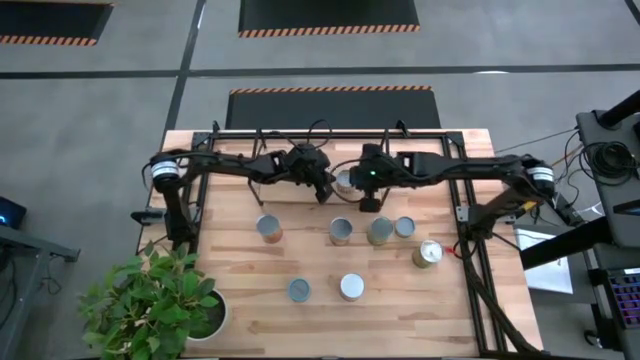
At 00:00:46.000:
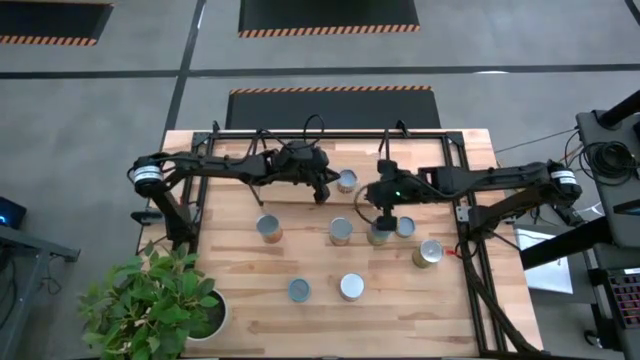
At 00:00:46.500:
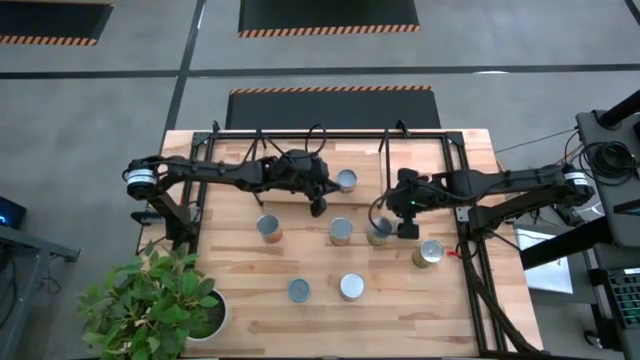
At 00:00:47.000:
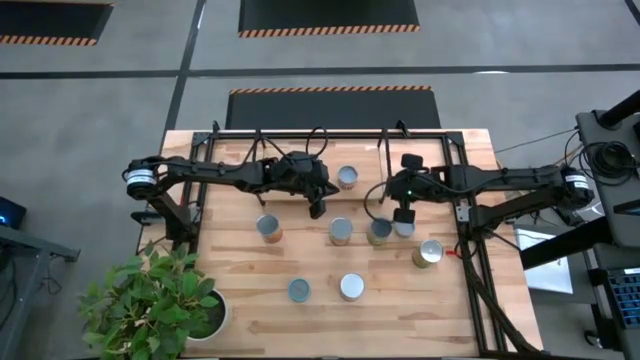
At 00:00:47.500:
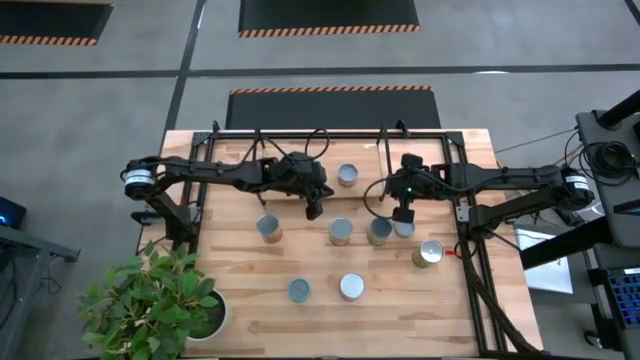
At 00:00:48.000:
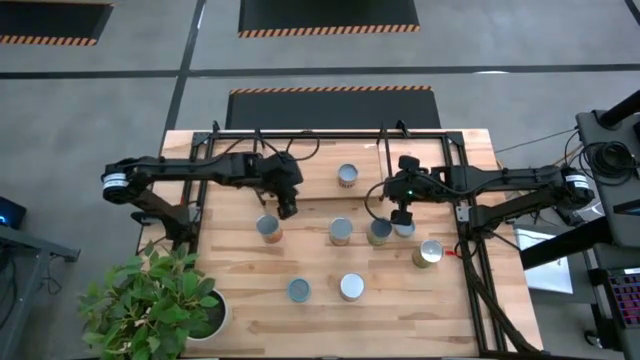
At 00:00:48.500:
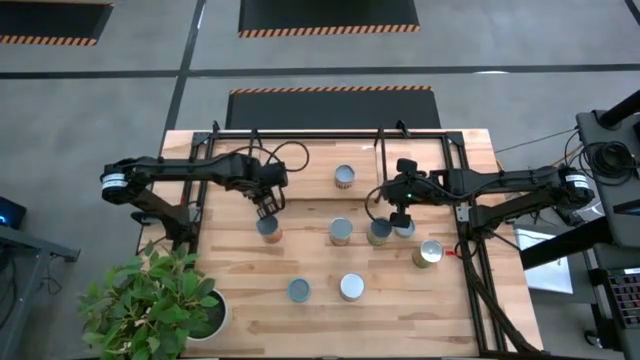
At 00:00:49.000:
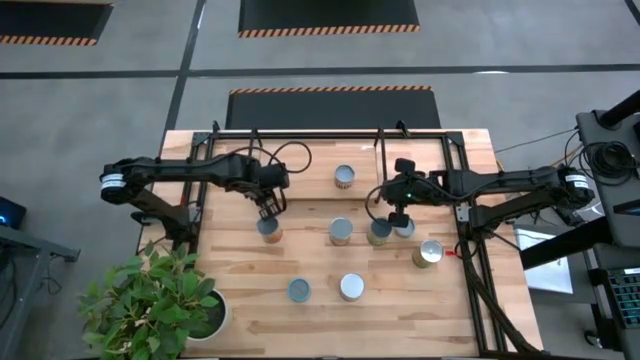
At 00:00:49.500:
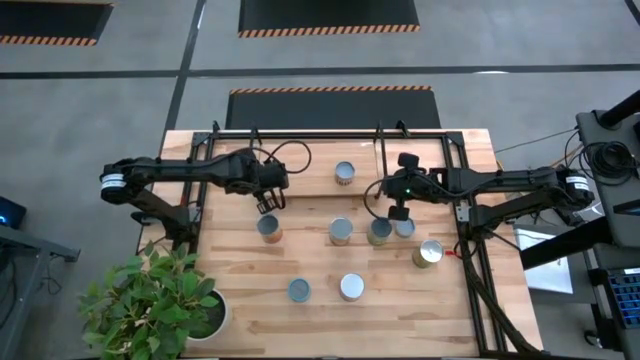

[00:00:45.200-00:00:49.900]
Task: Pick and place cans onto a shelf
Adjust the shelf

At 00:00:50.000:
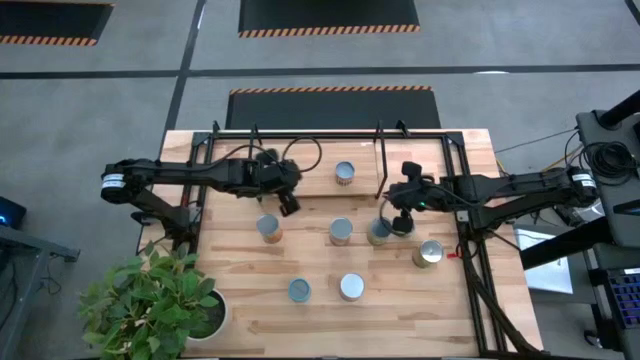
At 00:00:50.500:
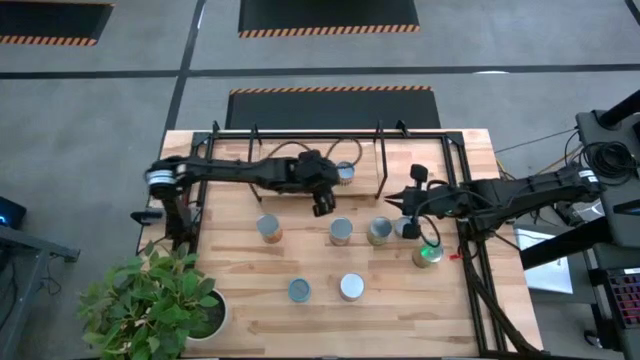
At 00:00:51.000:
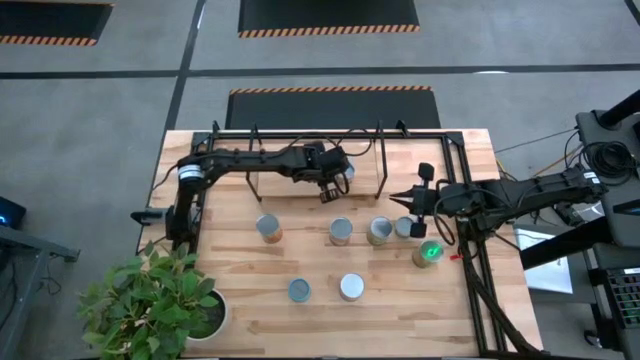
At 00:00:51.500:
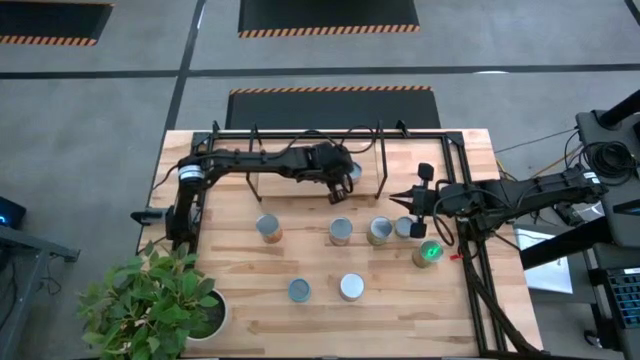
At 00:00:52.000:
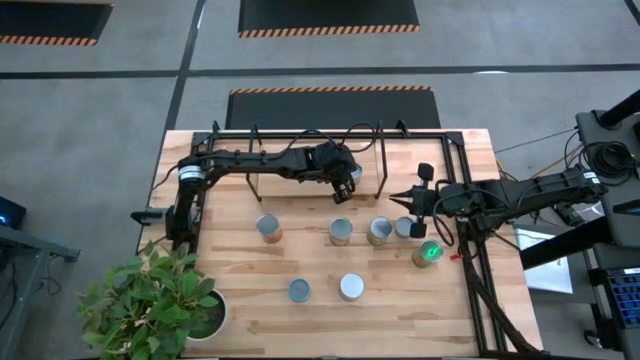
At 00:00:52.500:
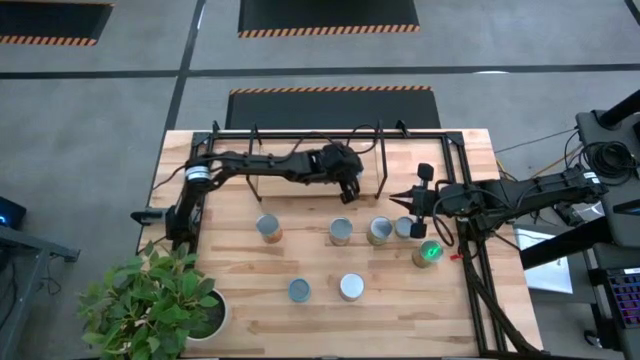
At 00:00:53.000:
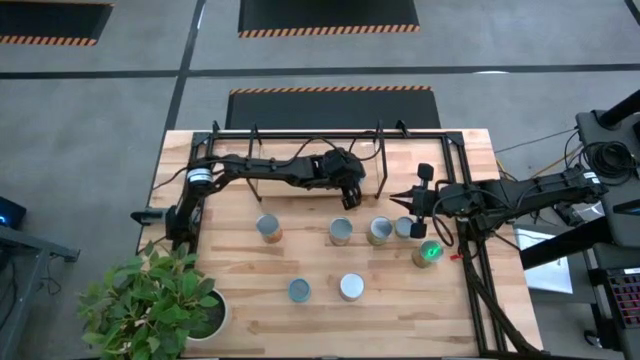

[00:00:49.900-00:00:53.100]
Adjust the small yellow canned bean on the shelf

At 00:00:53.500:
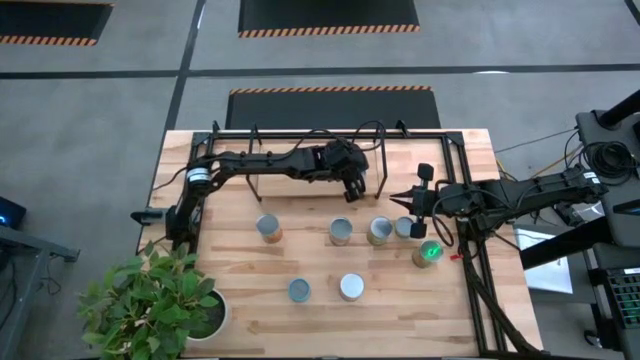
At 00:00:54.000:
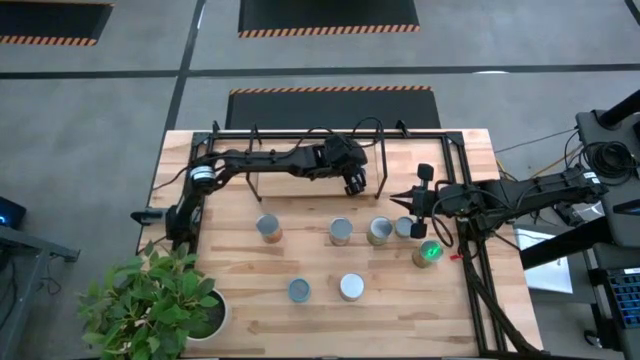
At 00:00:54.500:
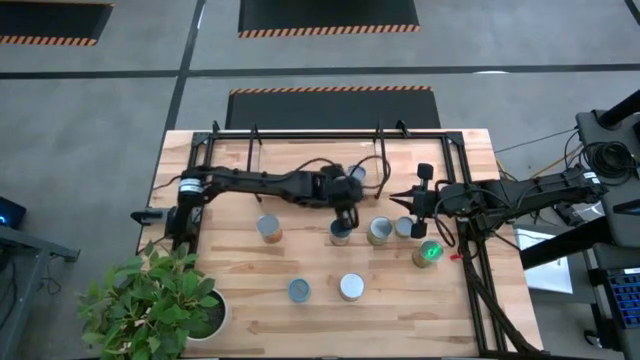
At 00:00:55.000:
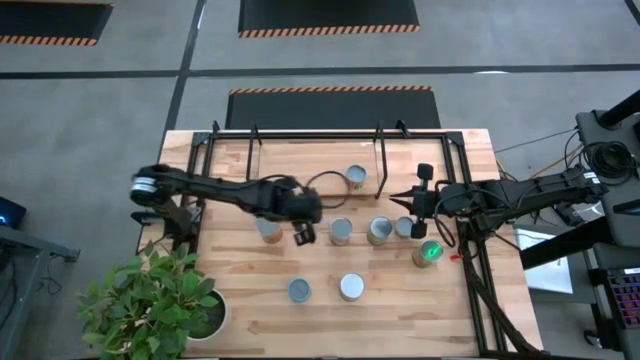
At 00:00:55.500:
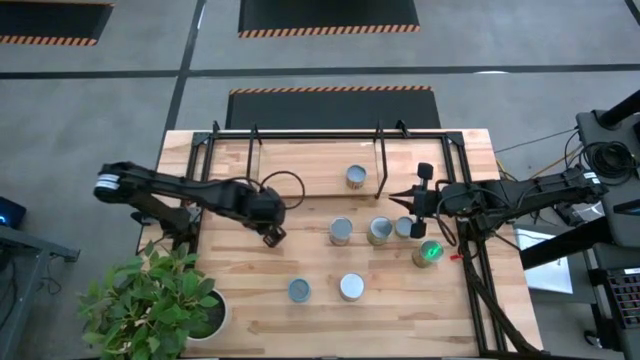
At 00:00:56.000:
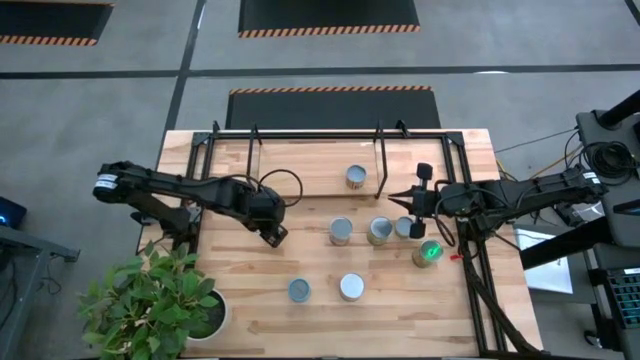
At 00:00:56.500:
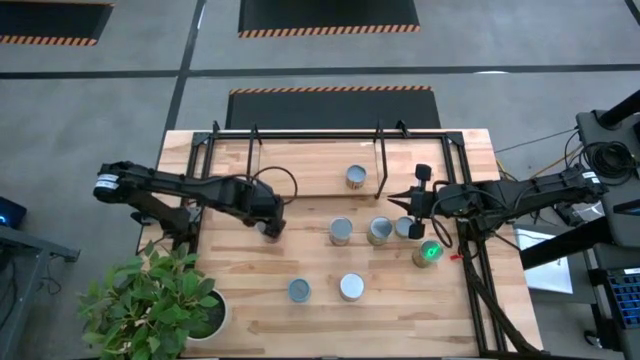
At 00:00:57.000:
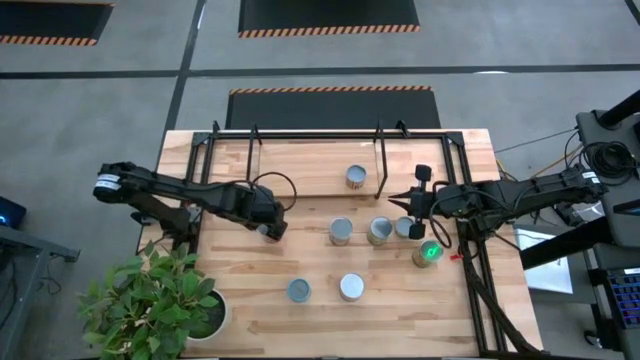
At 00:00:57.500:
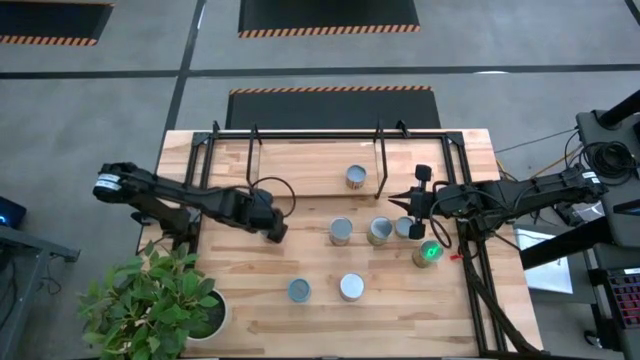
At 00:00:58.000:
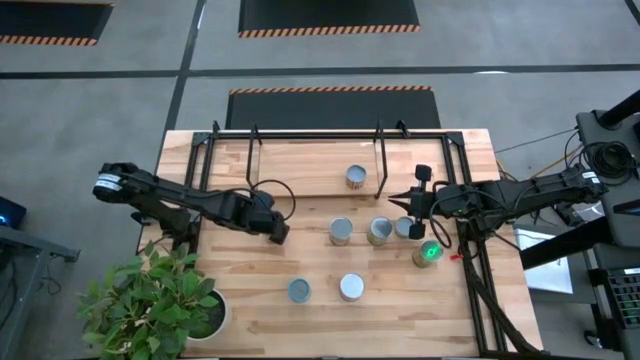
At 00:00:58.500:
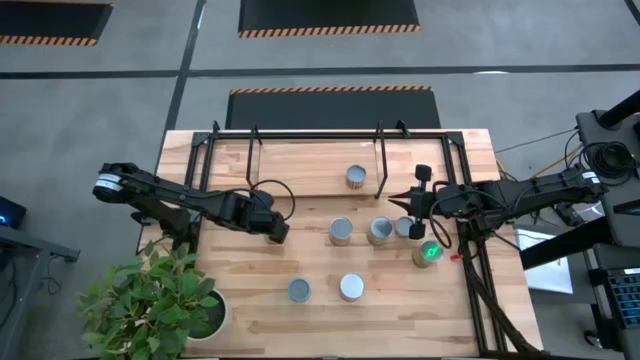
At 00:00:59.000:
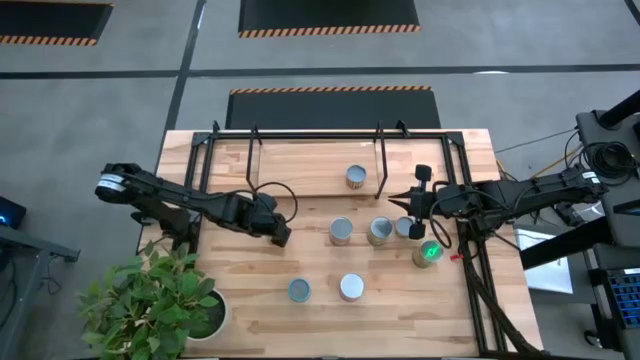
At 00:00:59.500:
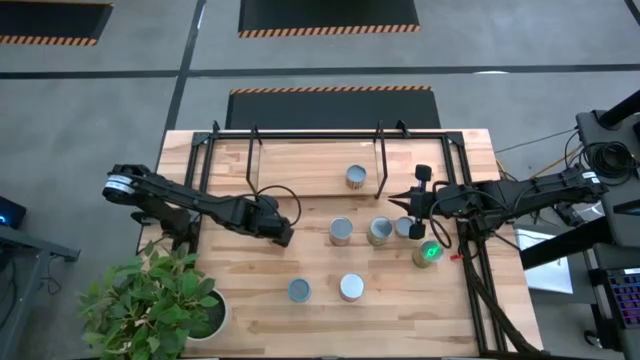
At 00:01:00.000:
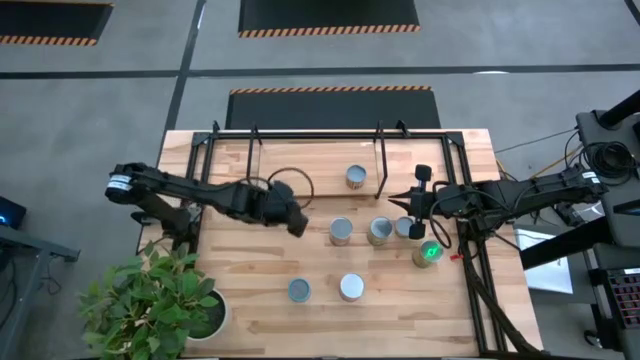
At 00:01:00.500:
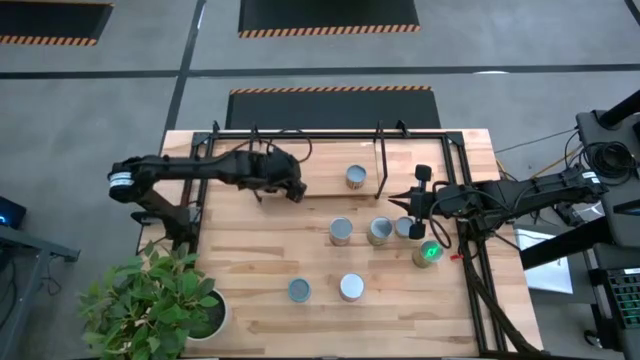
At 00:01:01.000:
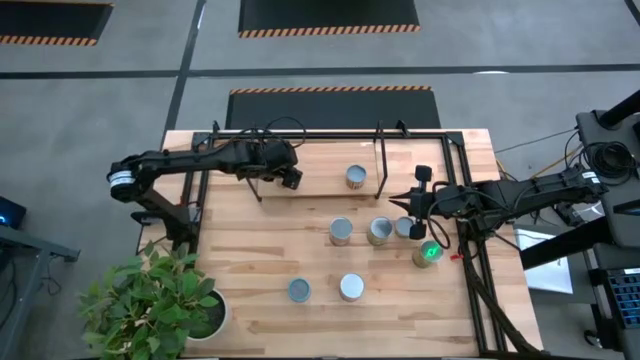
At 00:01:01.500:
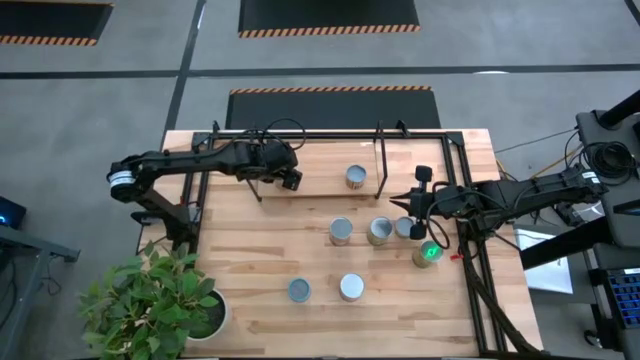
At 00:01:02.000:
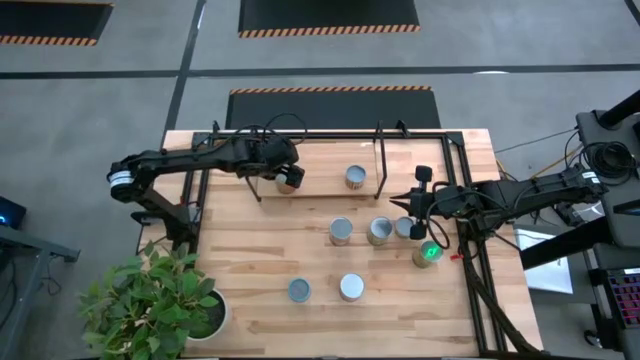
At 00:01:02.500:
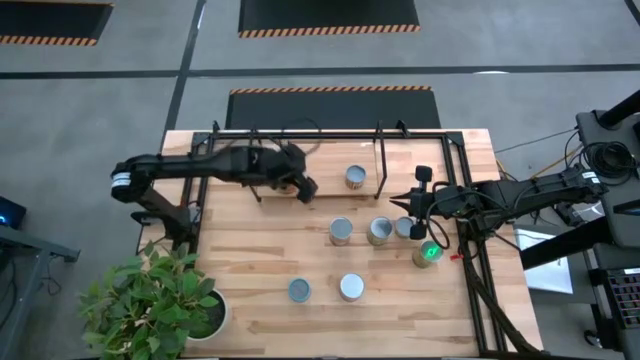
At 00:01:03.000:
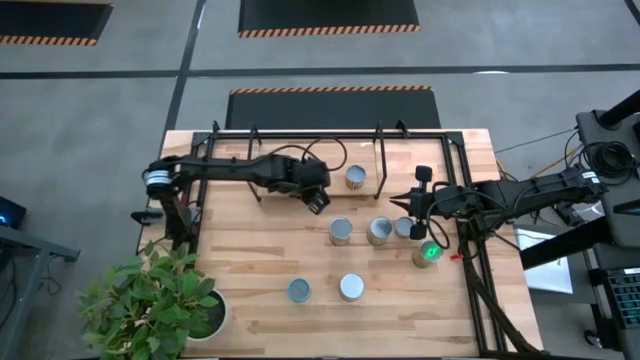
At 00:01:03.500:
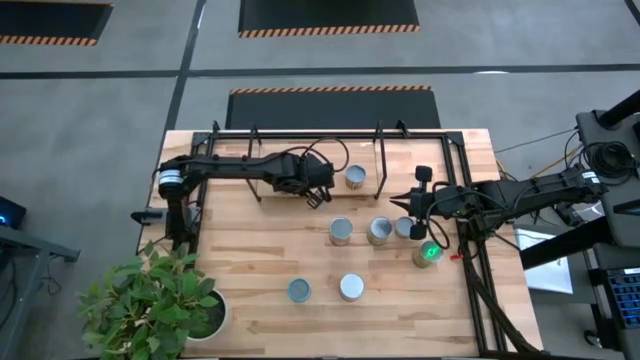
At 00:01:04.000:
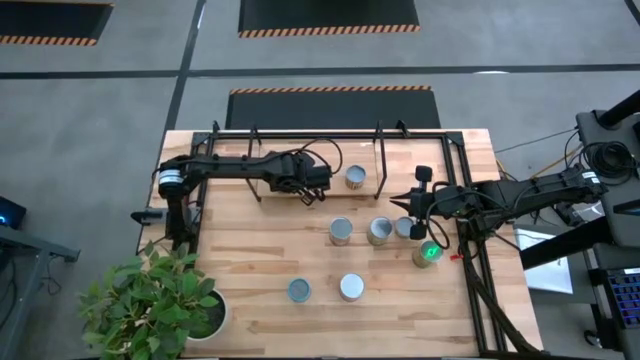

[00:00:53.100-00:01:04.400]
Put the big orange canned bean on the shelf

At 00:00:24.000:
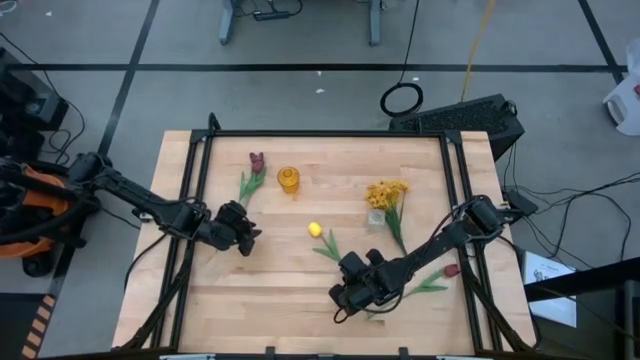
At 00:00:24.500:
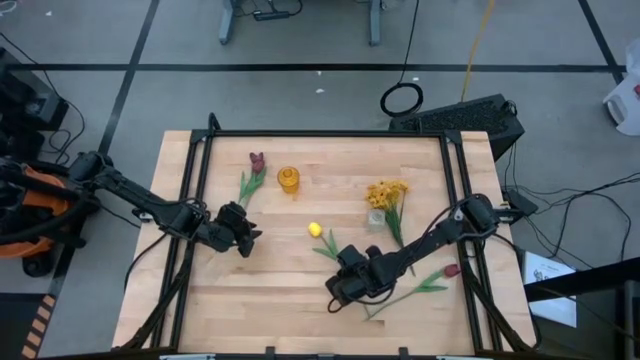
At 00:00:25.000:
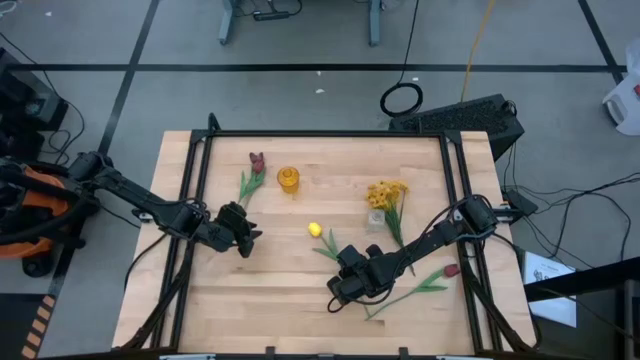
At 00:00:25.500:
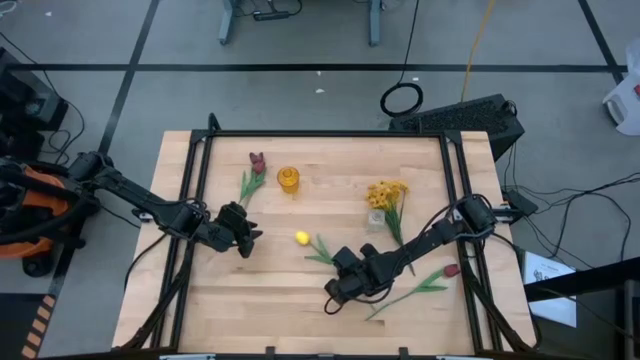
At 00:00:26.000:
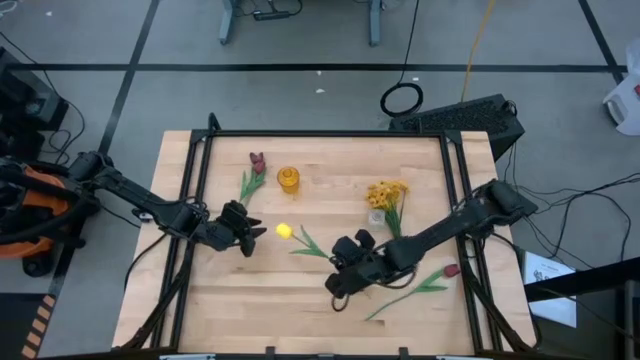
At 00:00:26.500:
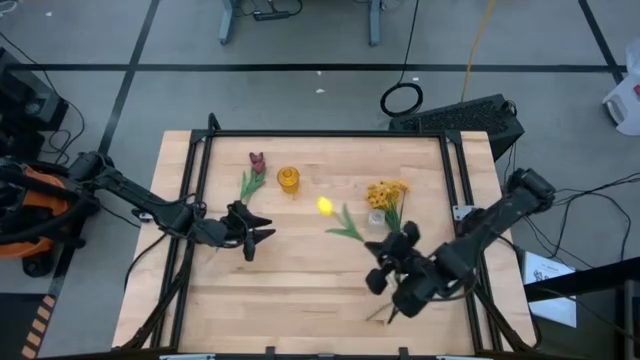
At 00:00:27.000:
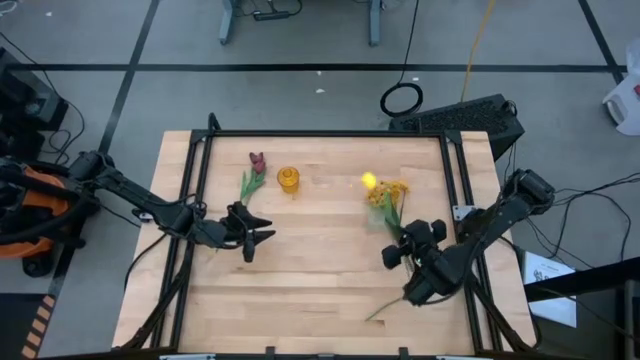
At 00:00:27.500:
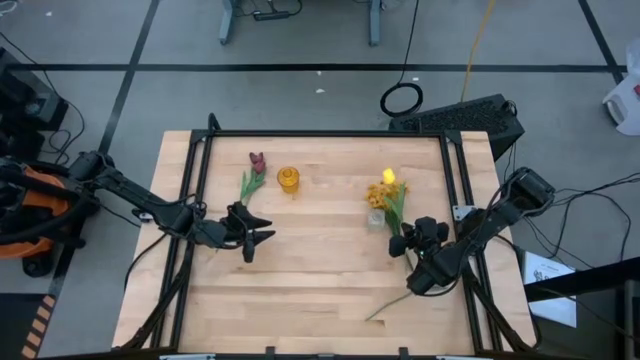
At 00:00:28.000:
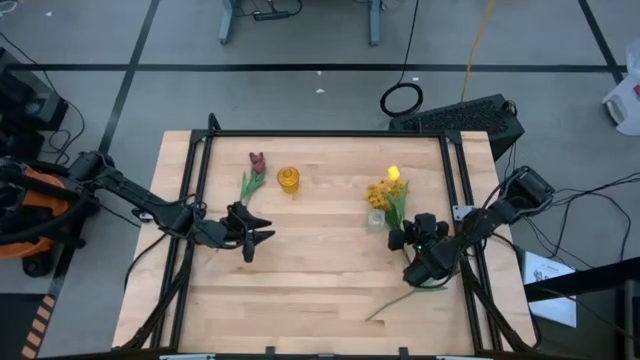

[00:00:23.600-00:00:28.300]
Task: Sort flowers into vase by color
Move the yellow flower on top of the other yellow flower
